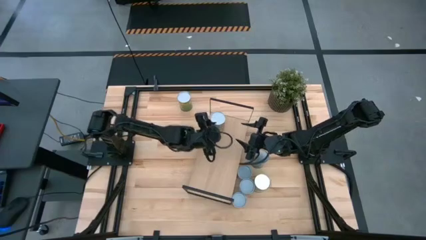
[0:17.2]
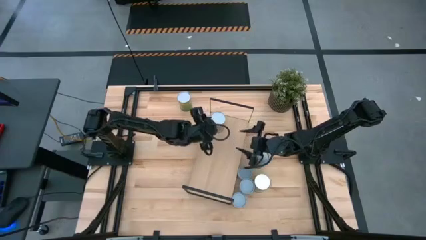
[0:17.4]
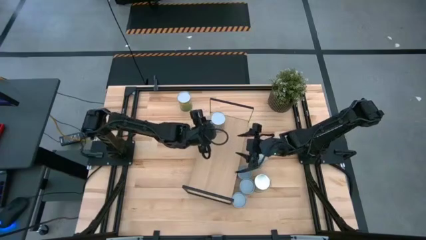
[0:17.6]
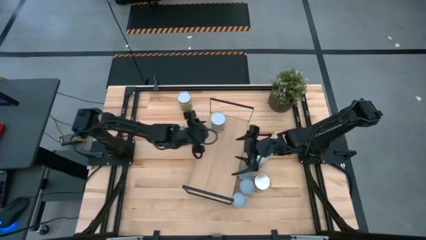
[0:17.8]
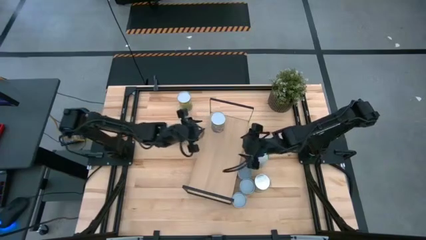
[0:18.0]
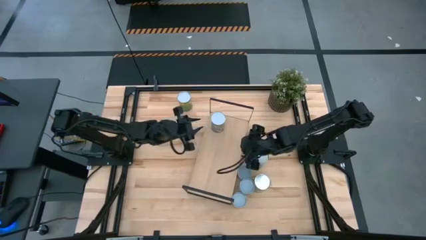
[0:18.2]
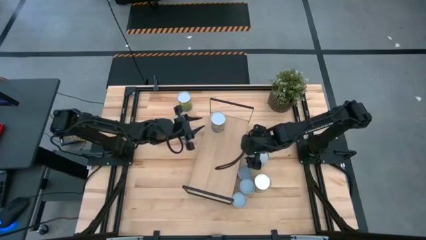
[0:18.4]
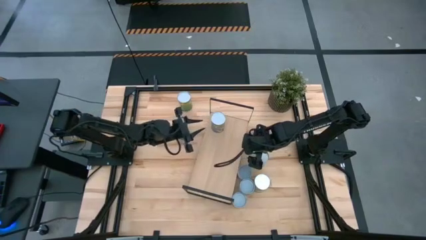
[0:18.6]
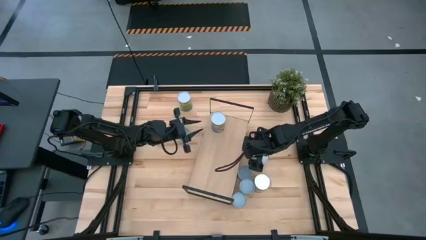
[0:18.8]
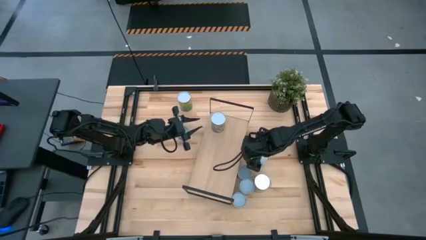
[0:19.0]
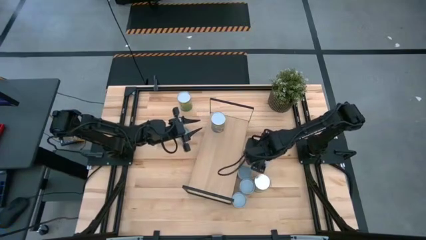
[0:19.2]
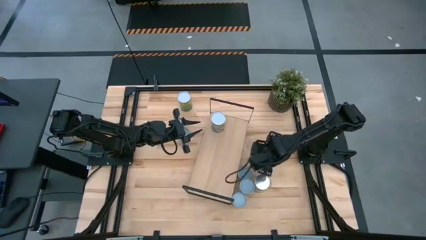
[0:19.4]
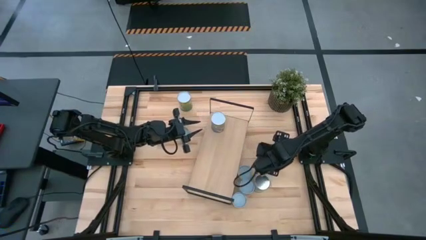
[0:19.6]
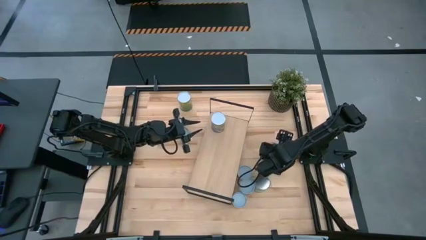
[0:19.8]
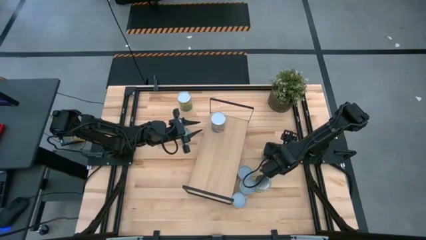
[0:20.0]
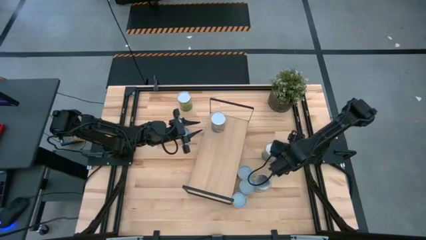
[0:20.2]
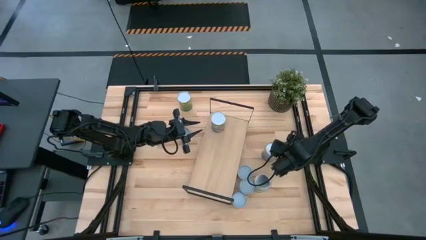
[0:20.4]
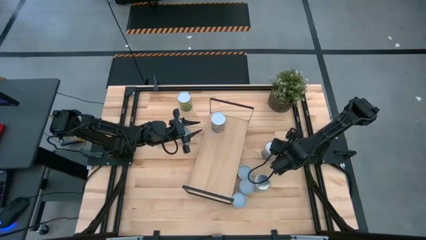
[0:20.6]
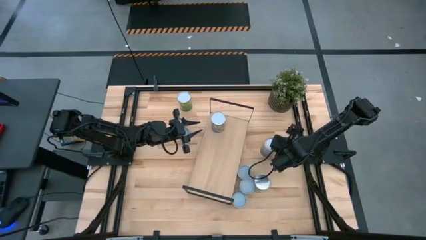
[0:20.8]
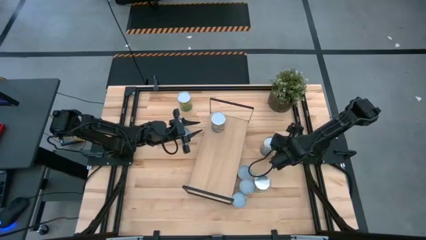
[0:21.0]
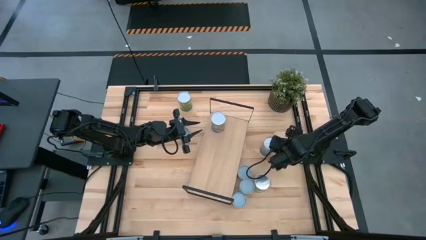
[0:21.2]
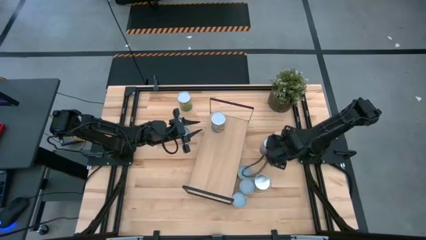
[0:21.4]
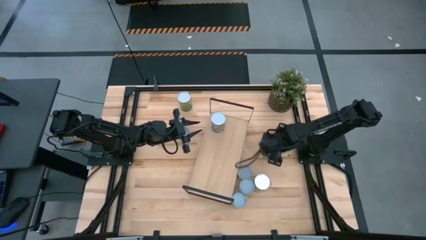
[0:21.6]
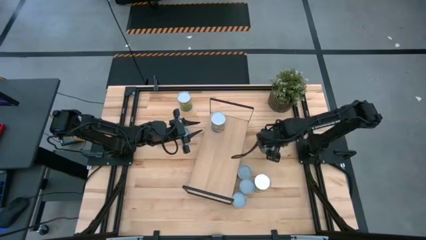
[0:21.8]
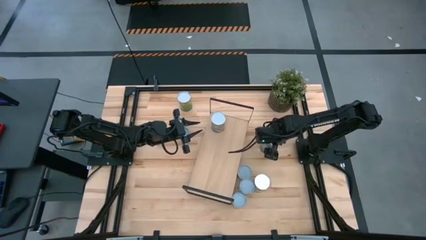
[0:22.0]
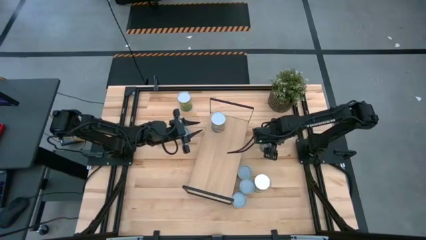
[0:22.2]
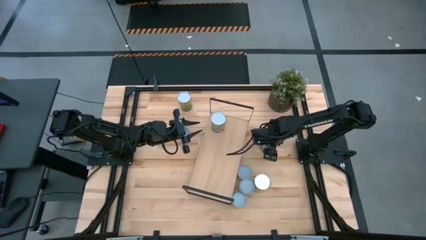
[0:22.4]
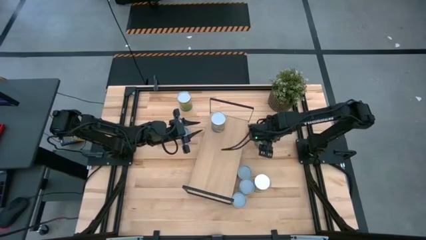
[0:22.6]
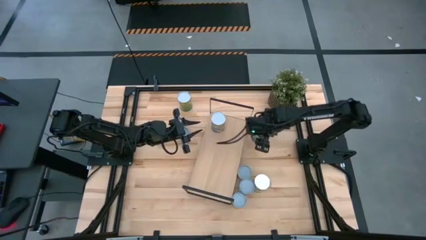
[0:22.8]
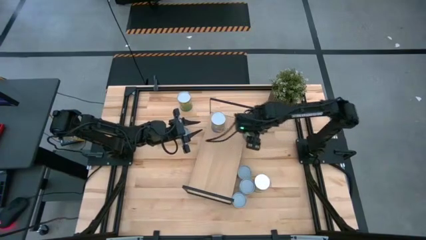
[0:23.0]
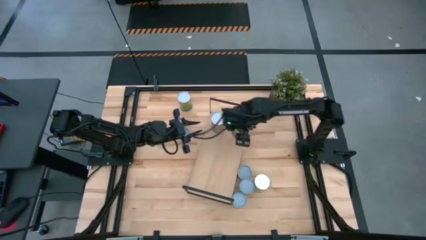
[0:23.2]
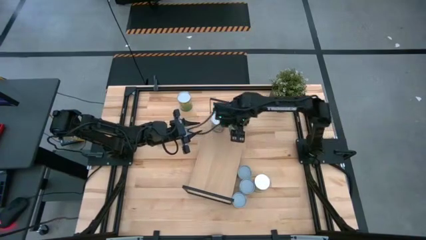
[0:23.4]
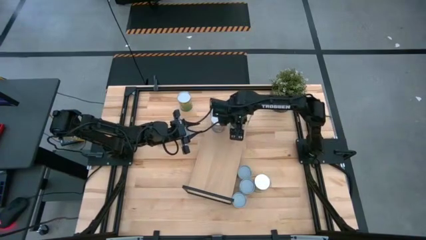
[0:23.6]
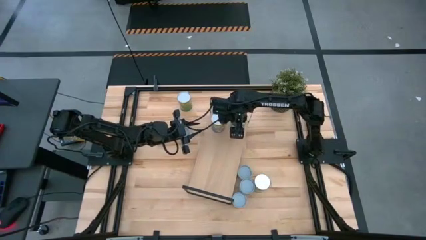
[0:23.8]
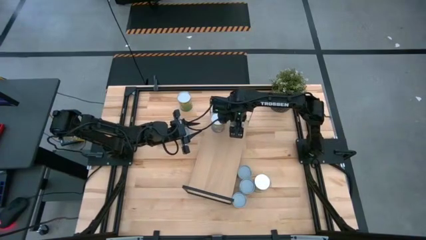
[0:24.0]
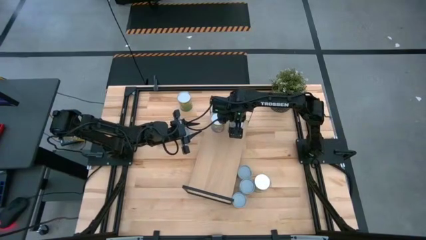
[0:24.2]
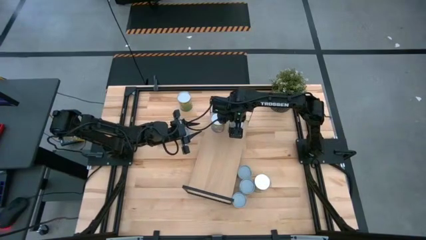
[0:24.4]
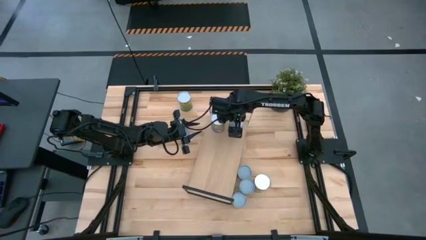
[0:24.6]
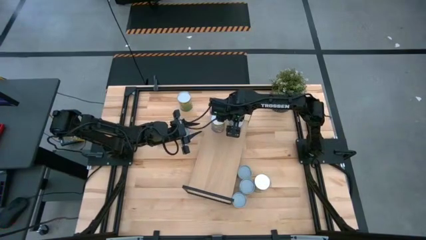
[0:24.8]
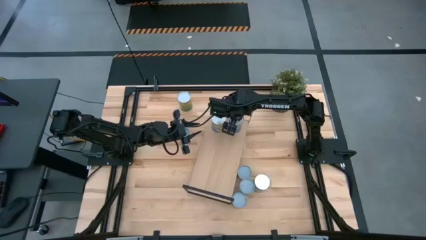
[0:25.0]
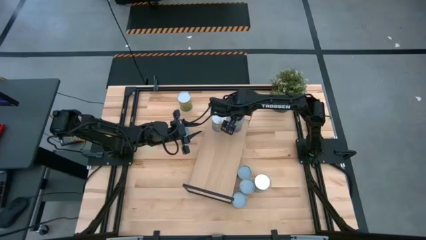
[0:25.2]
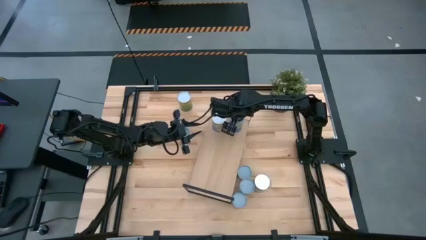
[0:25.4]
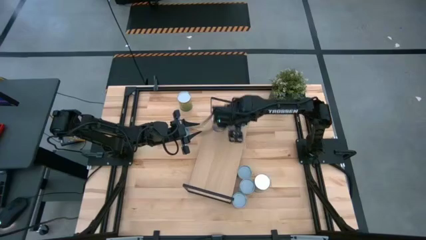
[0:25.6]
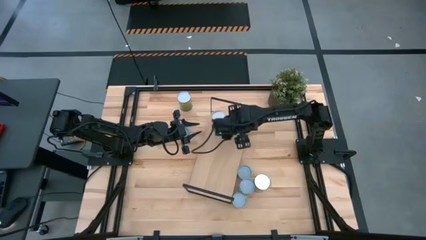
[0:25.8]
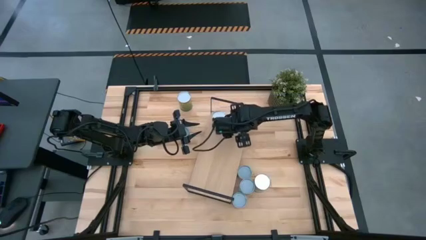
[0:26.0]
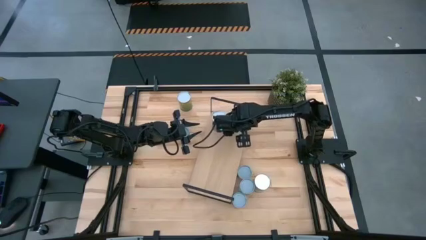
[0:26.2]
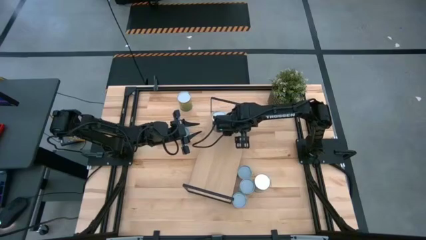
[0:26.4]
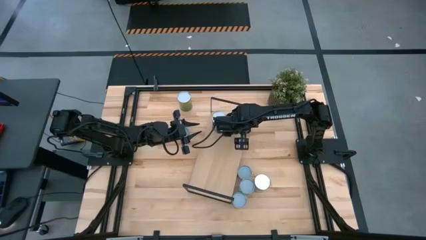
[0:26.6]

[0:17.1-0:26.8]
Task: Pick and place cans onto a shelf
Put the large canned peas on the shelf

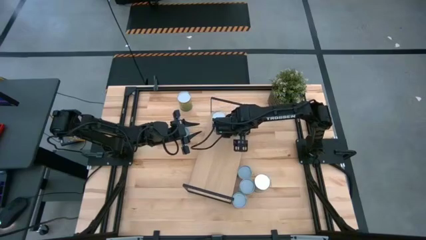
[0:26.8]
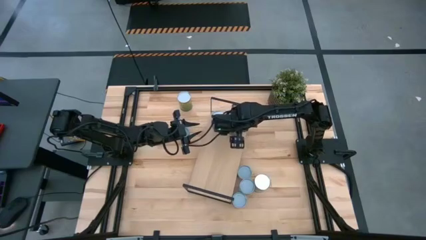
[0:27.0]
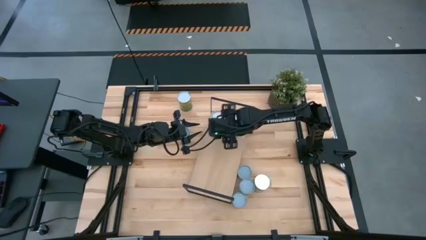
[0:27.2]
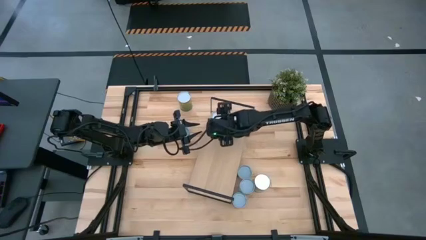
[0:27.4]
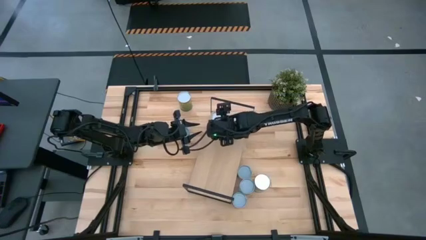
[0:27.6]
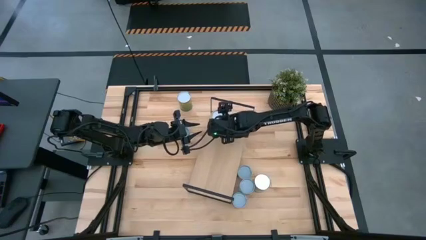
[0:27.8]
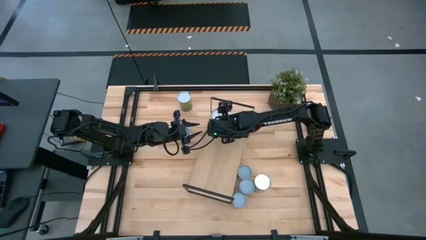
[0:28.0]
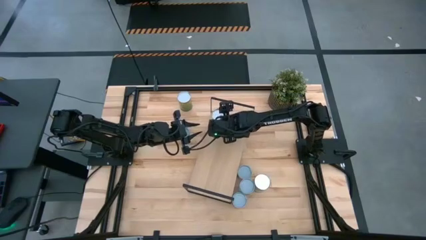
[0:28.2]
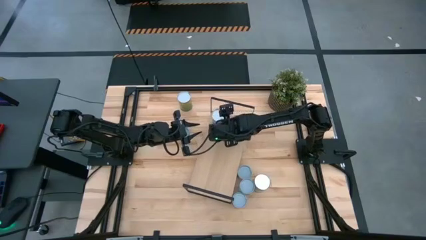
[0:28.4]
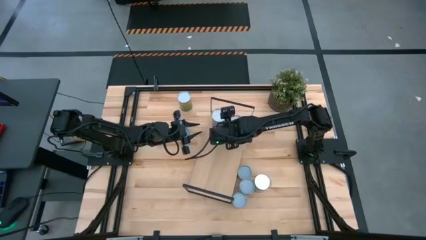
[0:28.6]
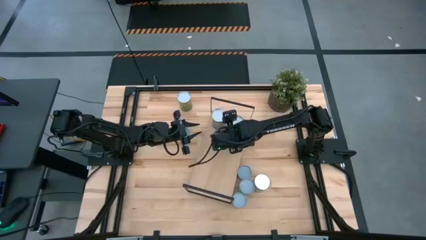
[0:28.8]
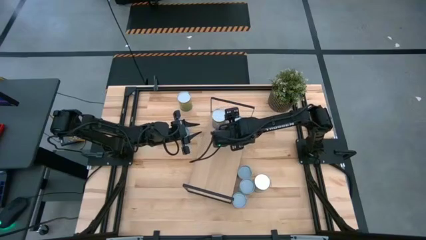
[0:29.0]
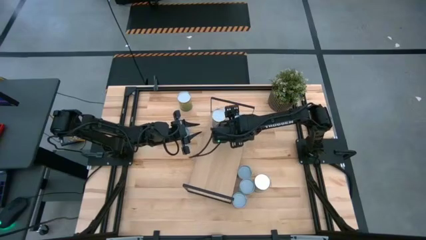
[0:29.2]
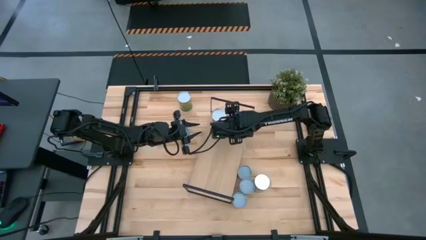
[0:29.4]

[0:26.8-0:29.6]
Adjust the cans on the shelf
